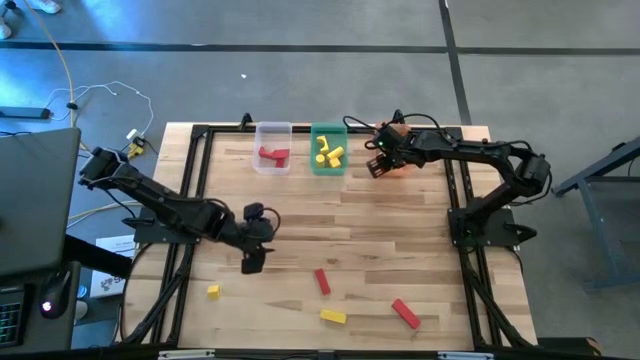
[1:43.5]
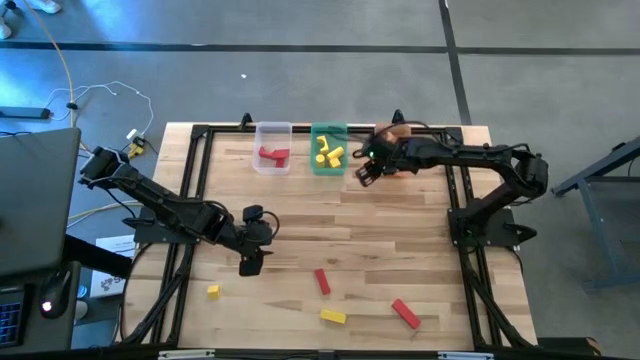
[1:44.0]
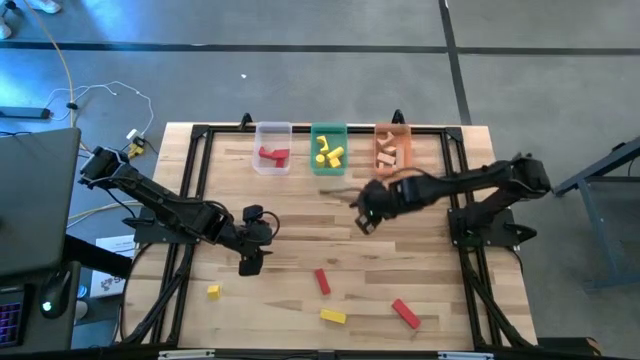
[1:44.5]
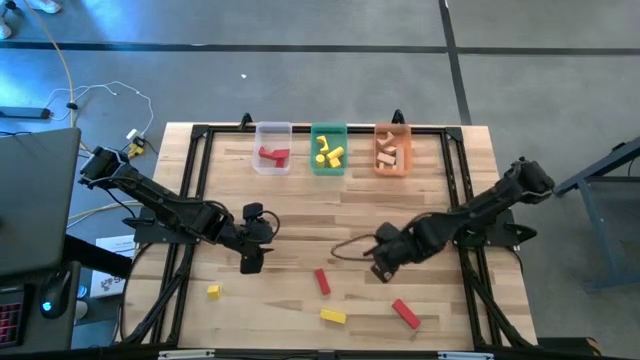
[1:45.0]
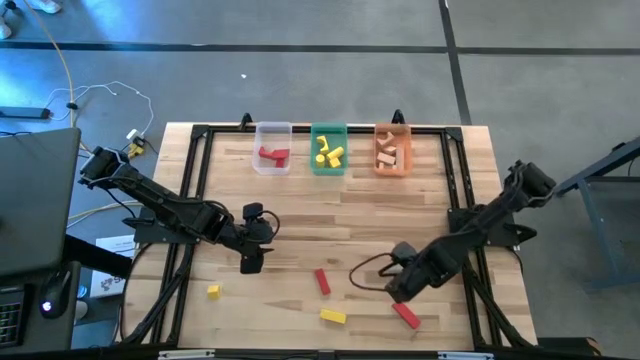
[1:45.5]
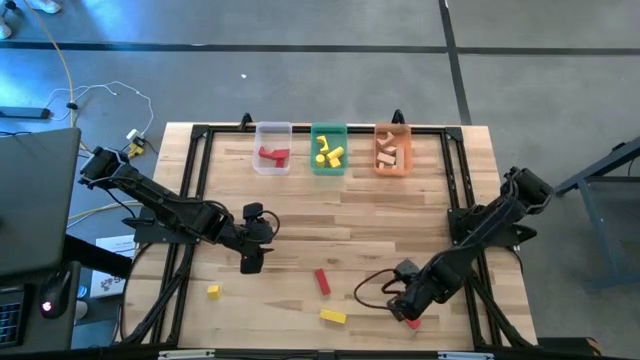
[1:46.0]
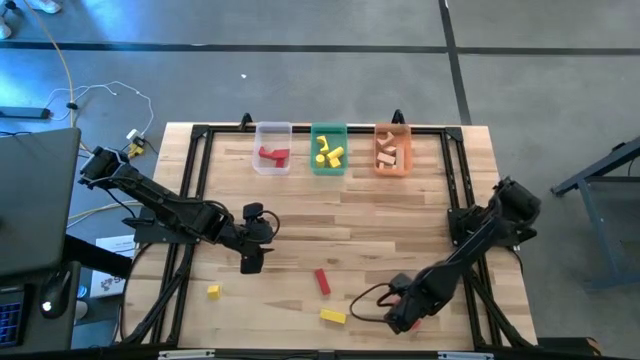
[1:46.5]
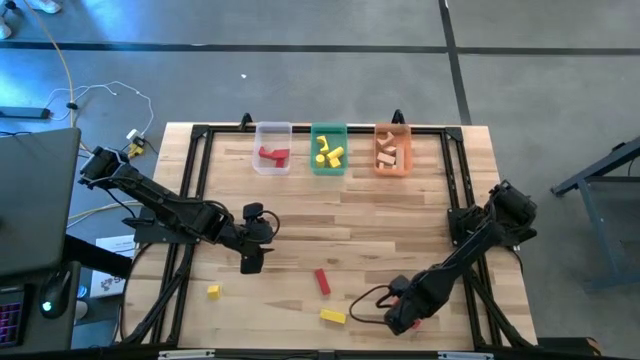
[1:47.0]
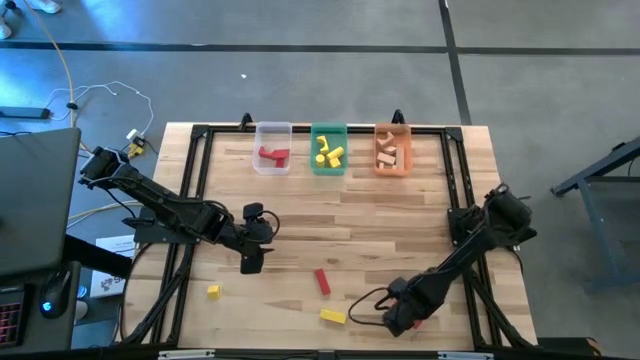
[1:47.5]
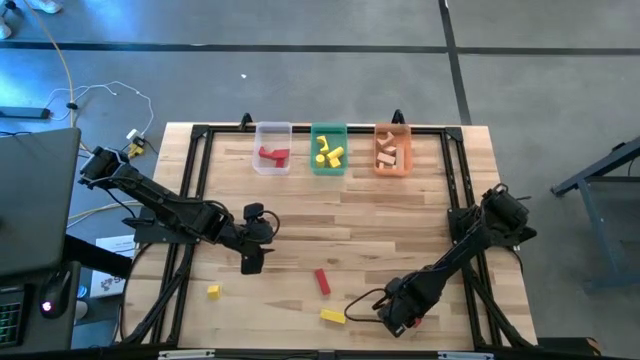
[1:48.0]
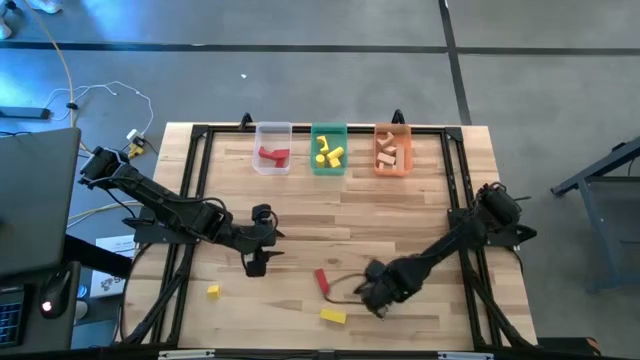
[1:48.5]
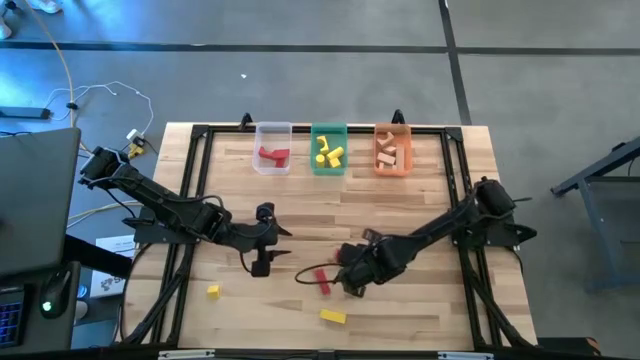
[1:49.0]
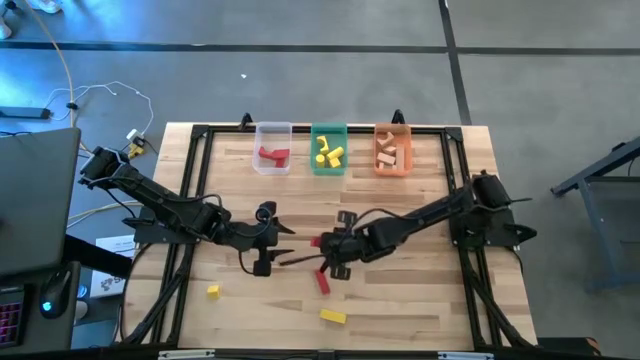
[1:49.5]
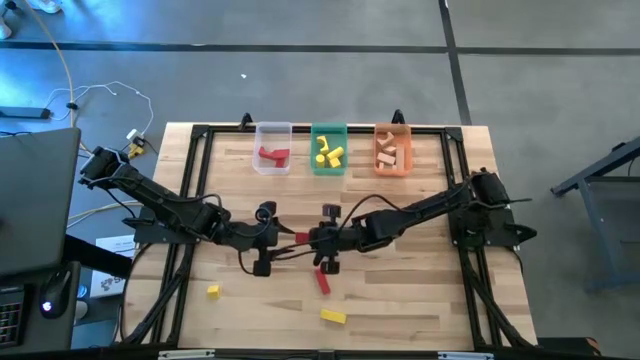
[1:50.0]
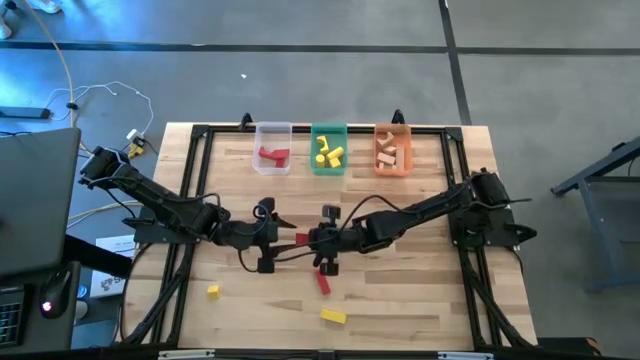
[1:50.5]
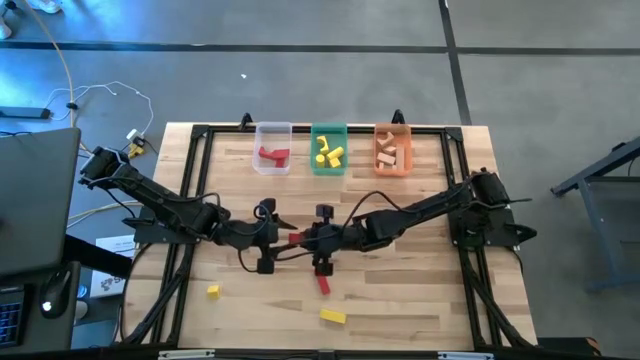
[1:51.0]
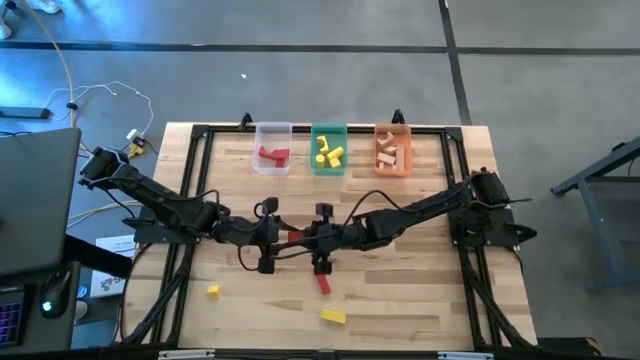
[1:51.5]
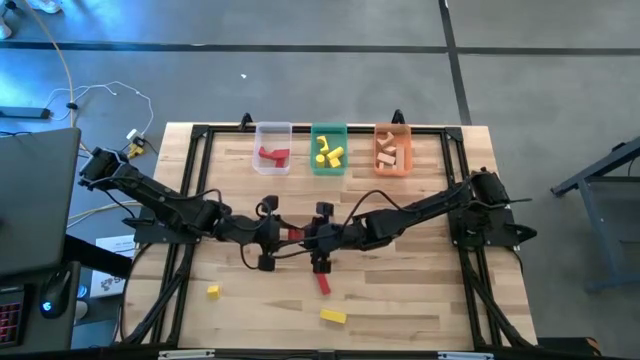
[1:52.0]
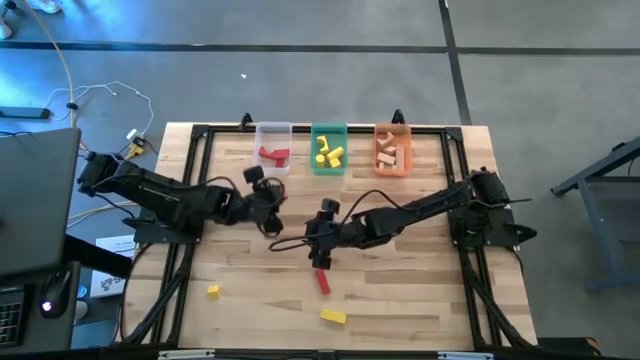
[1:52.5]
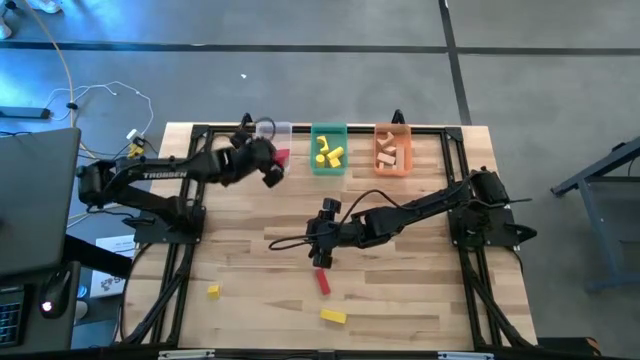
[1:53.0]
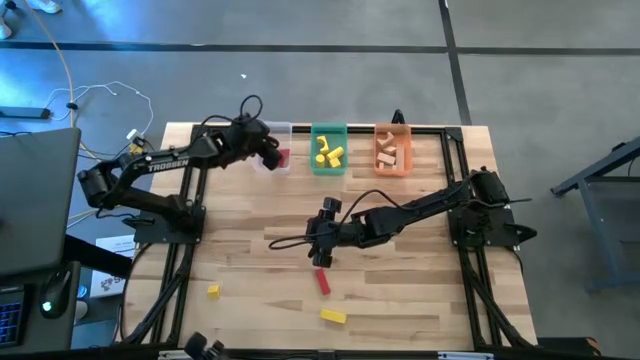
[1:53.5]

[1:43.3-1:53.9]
Task: Sort & place blocks by color
Put the red block into the white bin

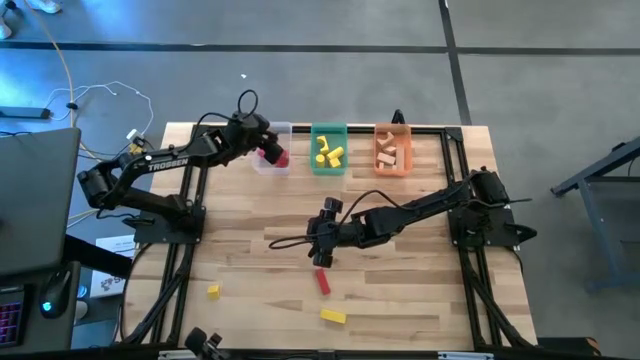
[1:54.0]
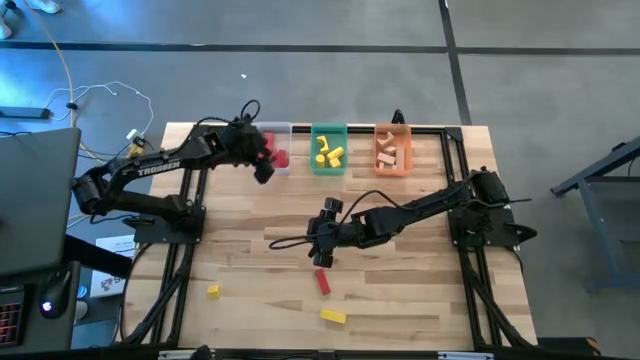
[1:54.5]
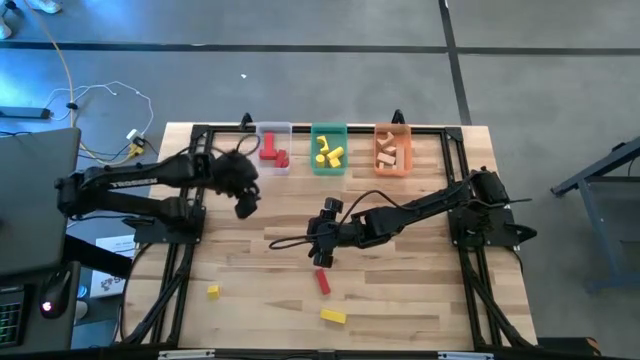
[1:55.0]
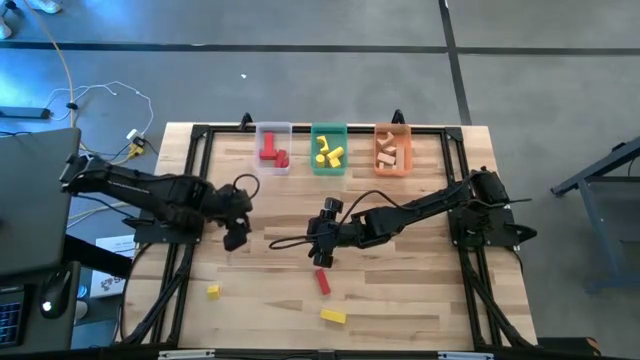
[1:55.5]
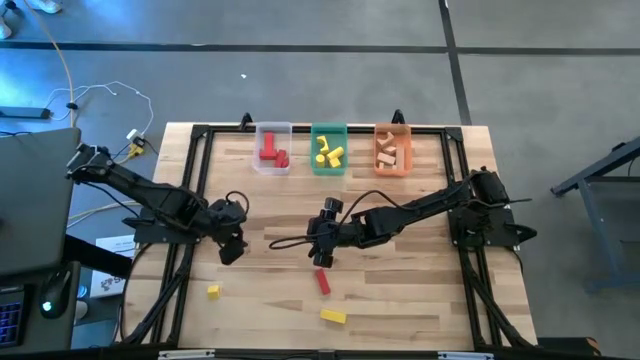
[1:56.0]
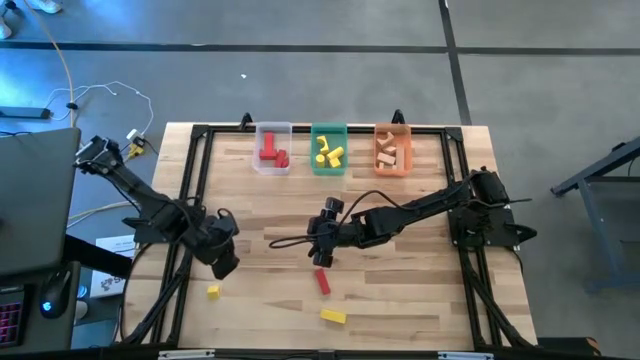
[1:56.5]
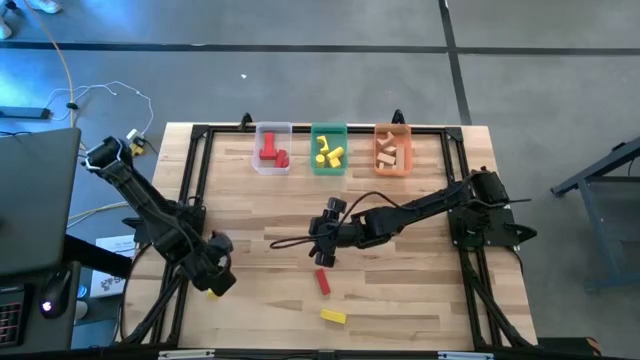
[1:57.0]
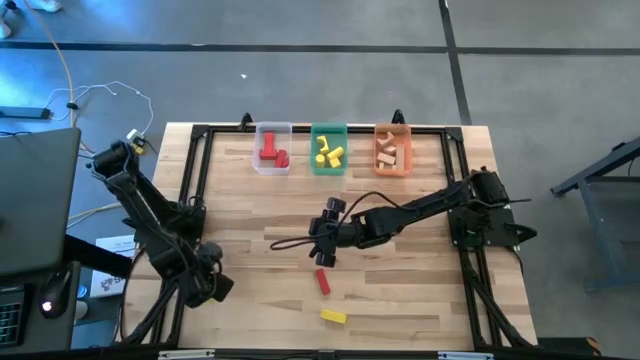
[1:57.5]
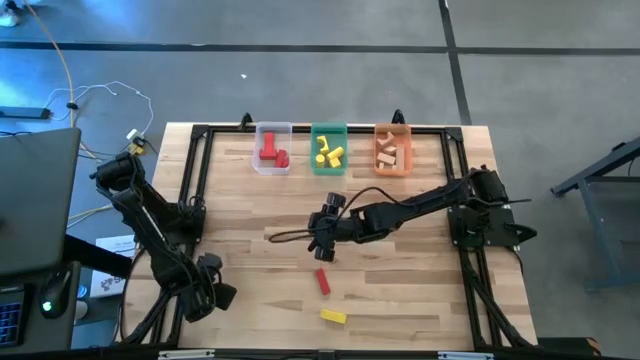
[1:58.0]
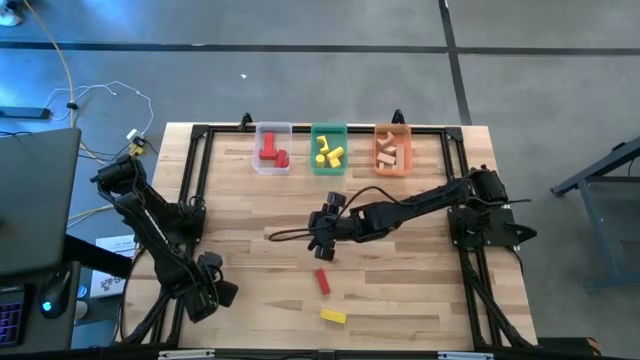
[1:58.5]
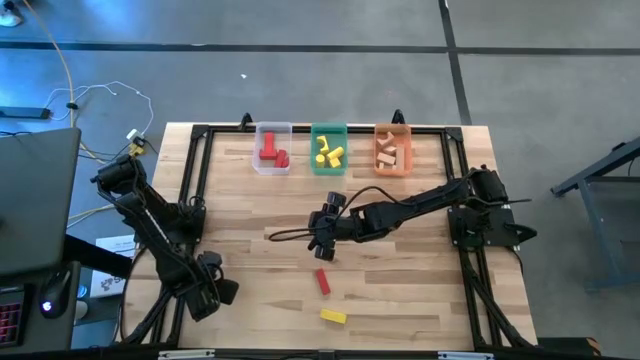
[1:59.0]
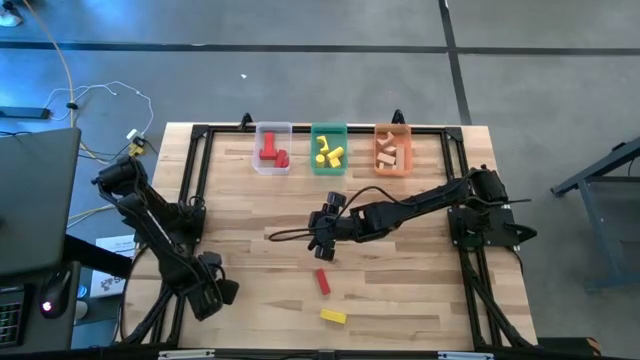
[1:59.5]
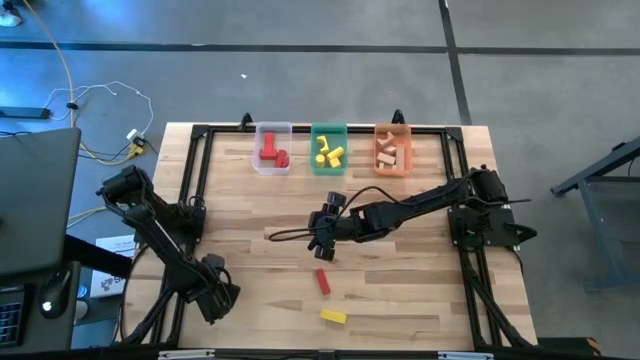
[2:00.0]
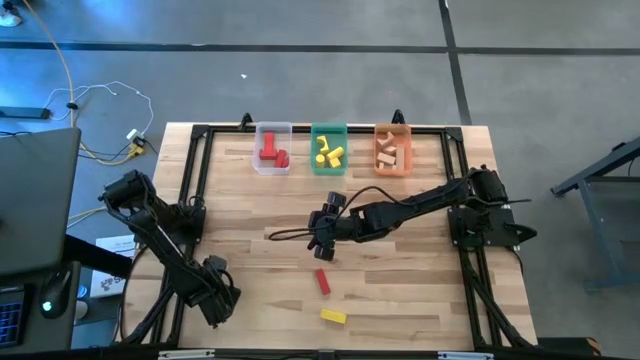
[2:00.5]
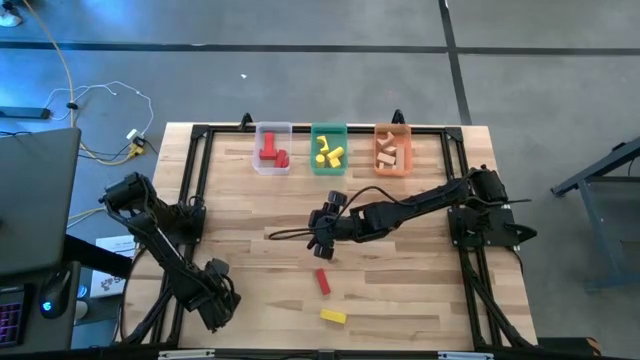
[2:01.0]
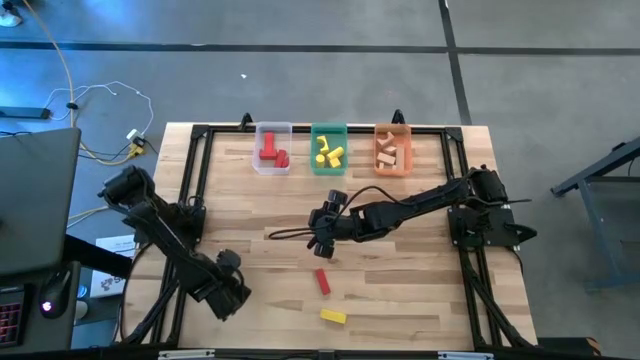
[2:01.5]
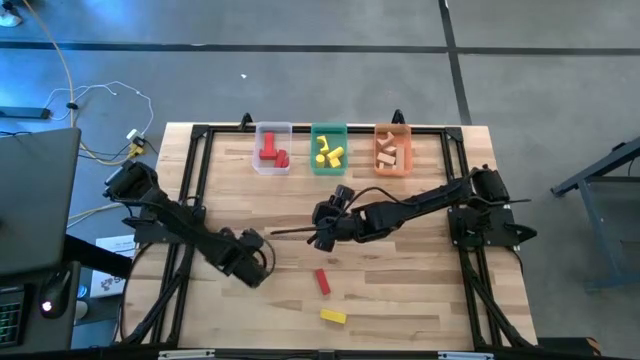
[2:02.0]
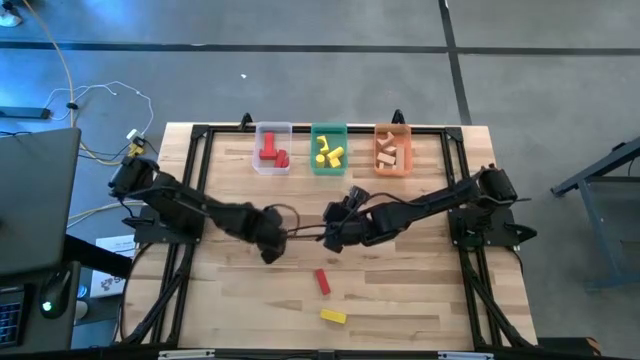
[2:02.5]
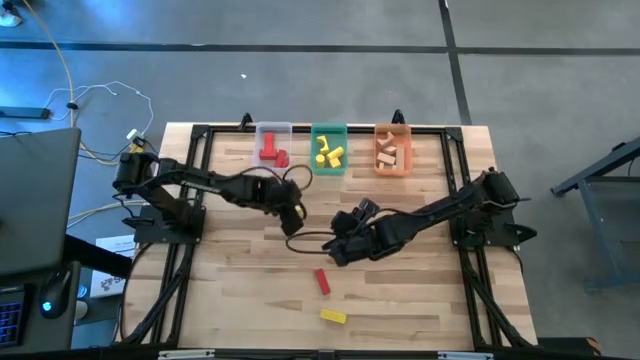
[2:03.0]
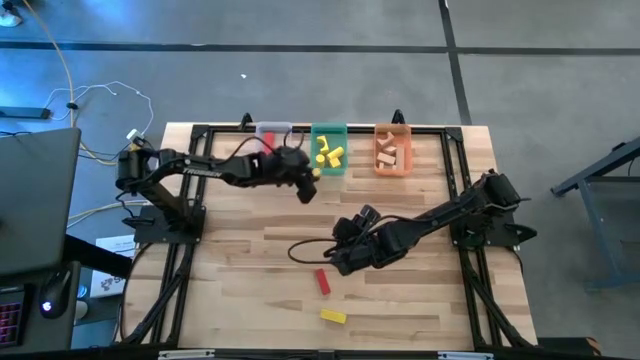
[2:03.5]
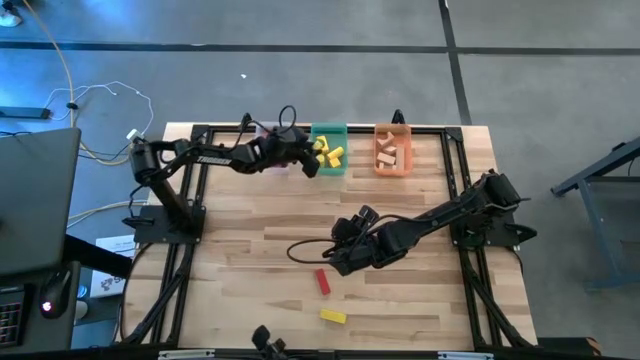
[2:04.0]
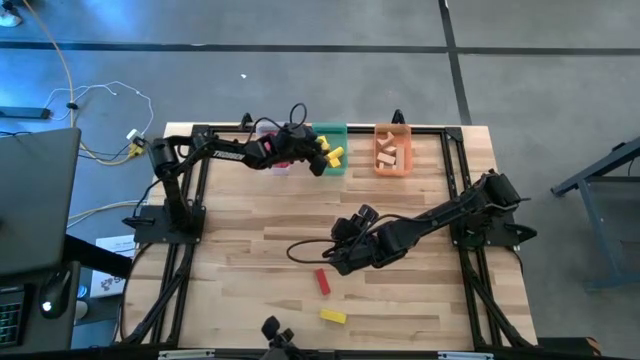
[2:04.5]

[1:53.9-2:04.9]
Put the yellow block into the green bin
